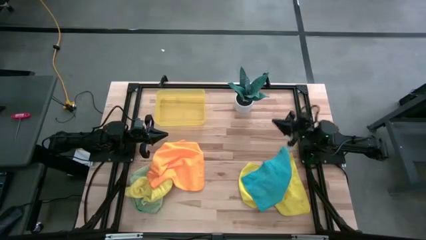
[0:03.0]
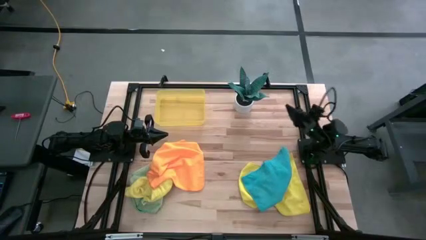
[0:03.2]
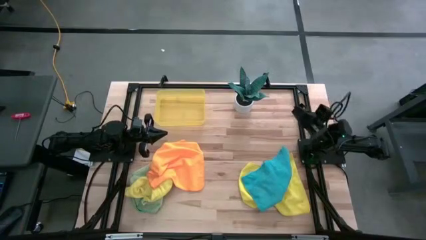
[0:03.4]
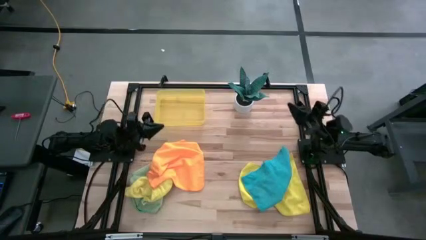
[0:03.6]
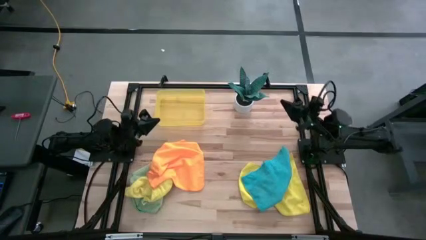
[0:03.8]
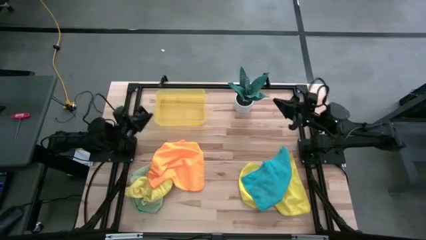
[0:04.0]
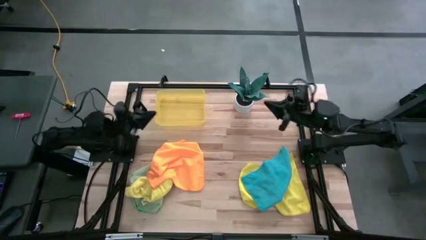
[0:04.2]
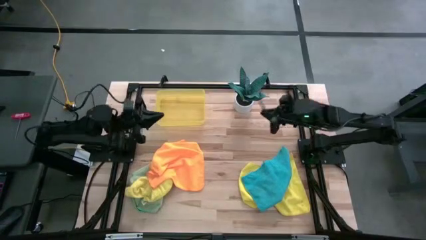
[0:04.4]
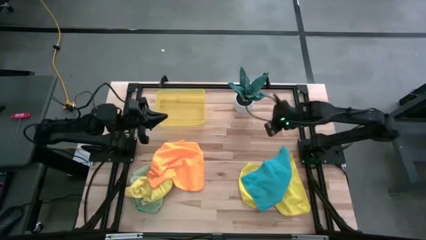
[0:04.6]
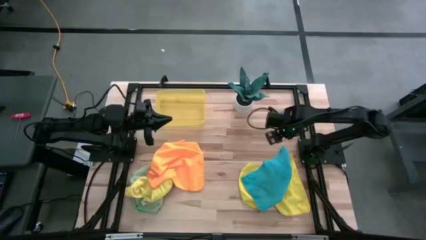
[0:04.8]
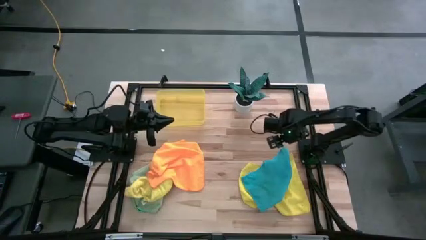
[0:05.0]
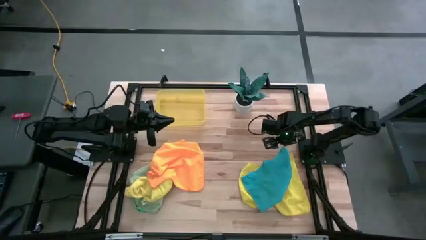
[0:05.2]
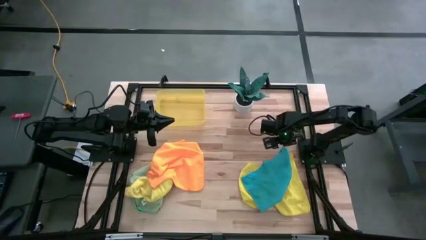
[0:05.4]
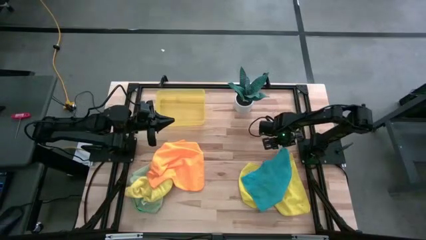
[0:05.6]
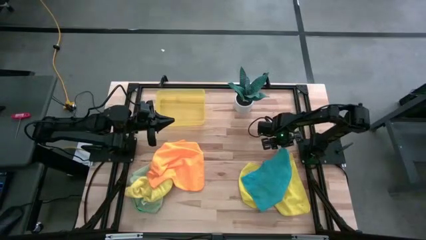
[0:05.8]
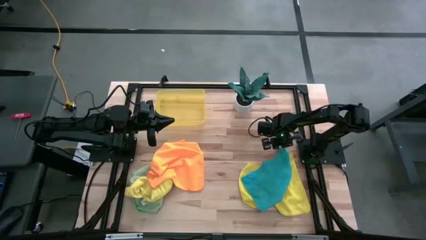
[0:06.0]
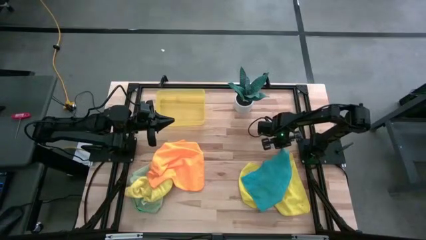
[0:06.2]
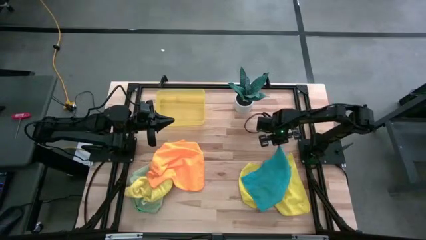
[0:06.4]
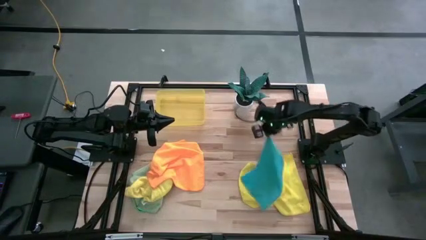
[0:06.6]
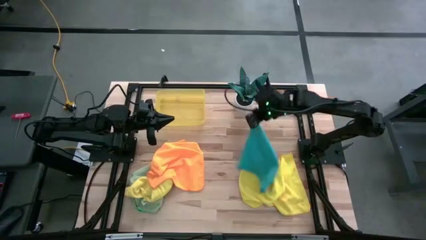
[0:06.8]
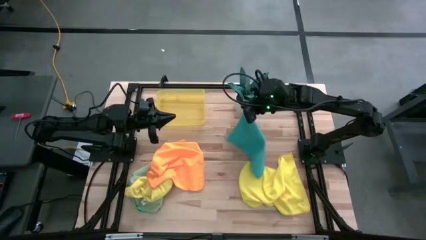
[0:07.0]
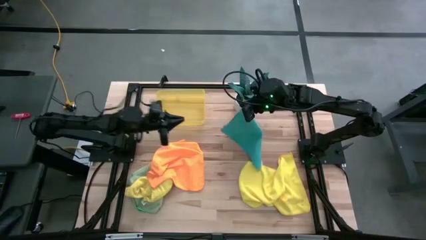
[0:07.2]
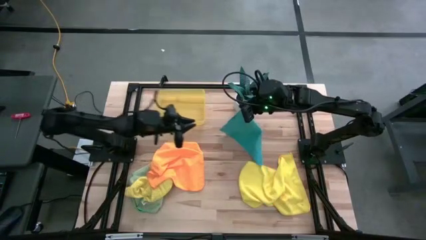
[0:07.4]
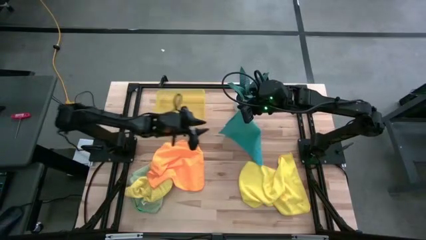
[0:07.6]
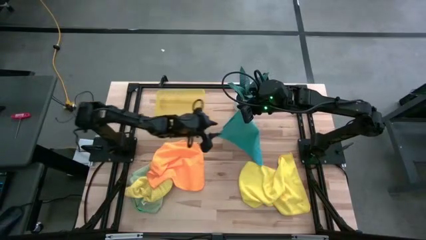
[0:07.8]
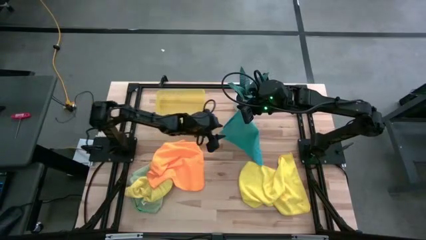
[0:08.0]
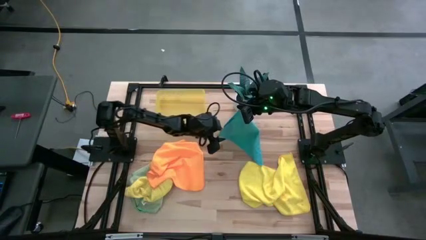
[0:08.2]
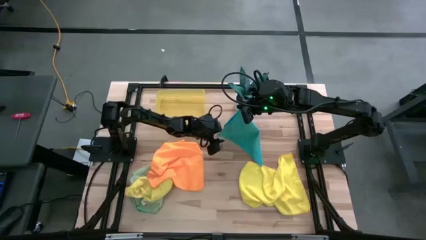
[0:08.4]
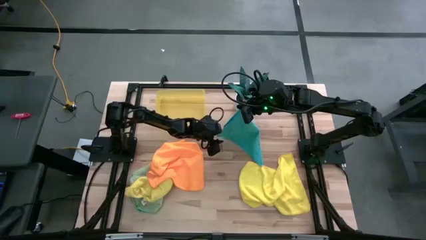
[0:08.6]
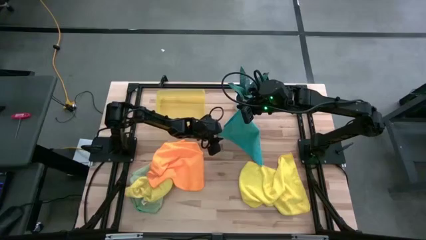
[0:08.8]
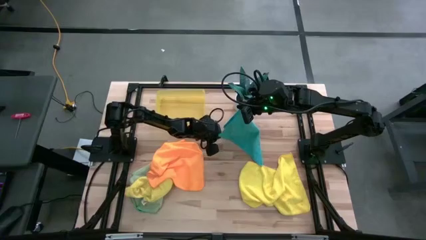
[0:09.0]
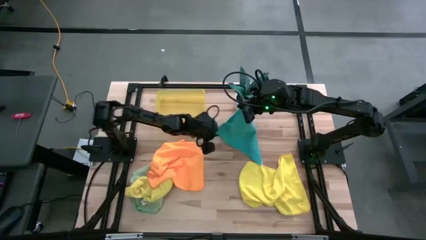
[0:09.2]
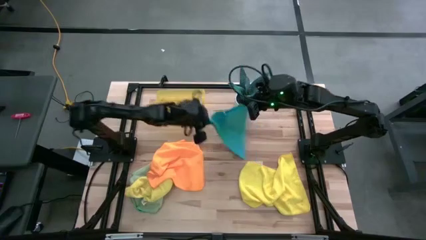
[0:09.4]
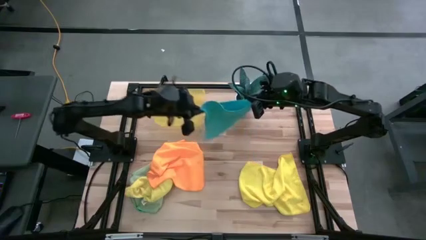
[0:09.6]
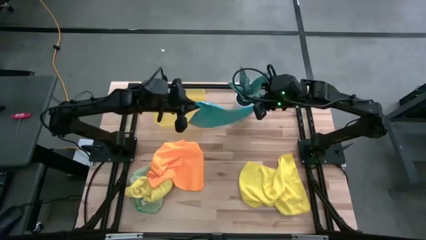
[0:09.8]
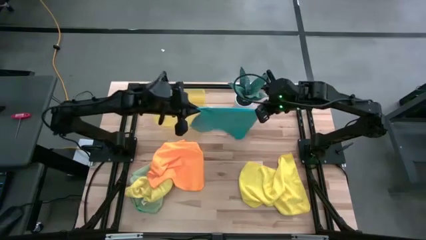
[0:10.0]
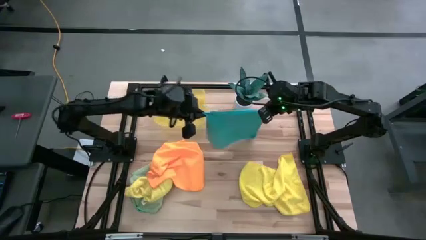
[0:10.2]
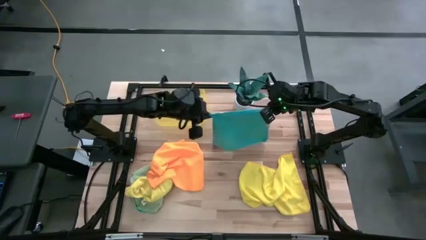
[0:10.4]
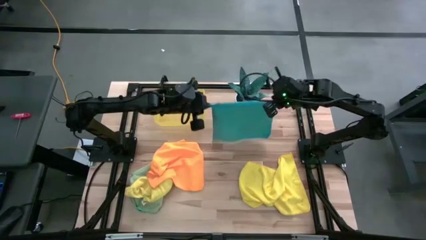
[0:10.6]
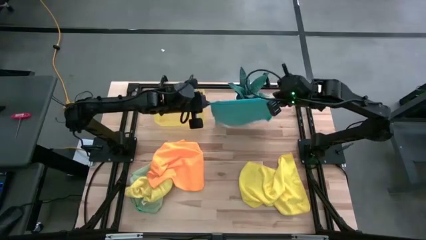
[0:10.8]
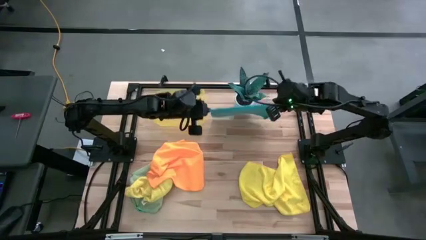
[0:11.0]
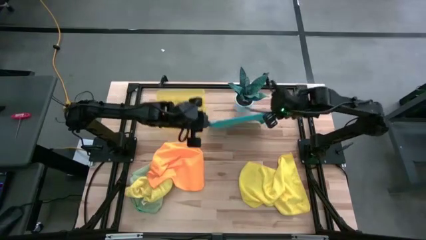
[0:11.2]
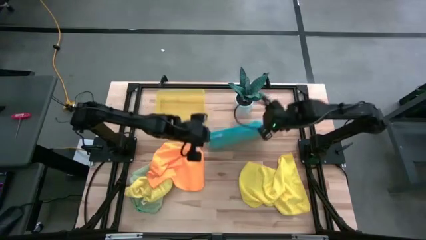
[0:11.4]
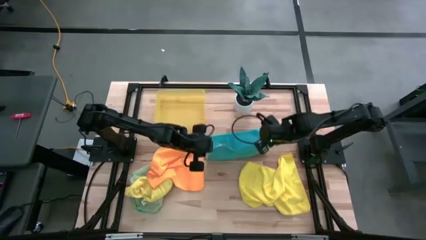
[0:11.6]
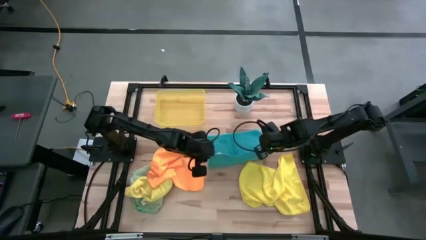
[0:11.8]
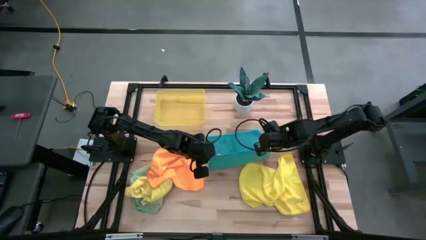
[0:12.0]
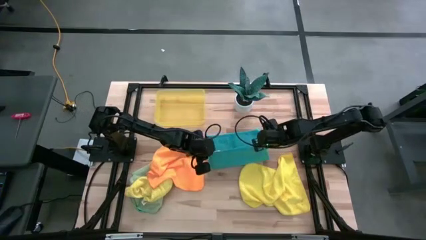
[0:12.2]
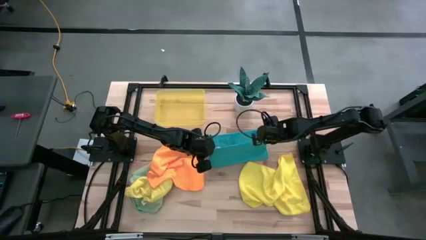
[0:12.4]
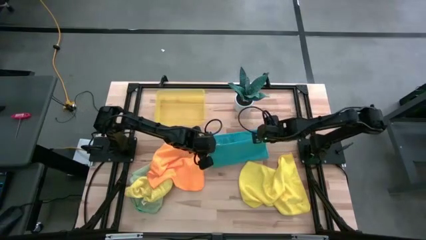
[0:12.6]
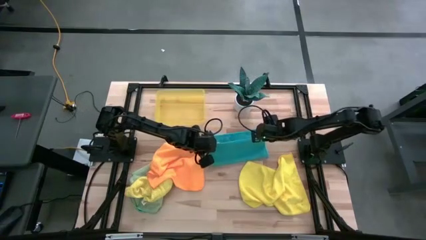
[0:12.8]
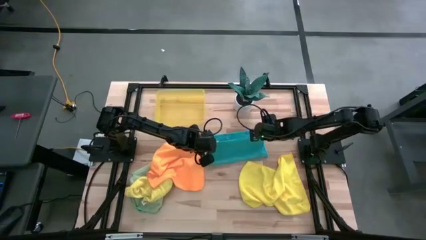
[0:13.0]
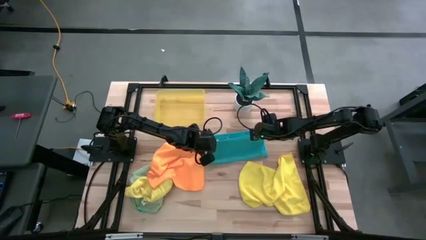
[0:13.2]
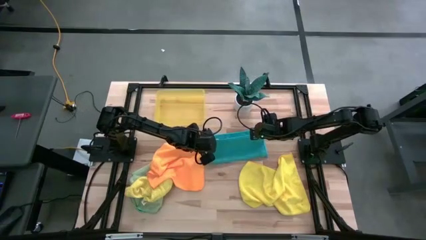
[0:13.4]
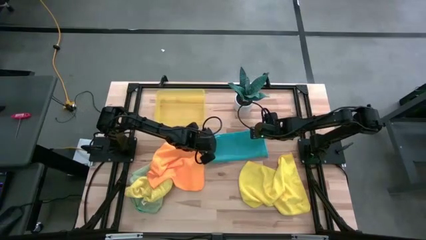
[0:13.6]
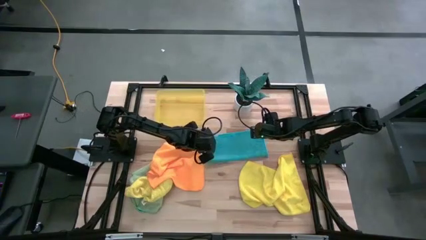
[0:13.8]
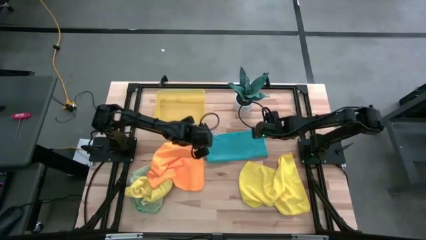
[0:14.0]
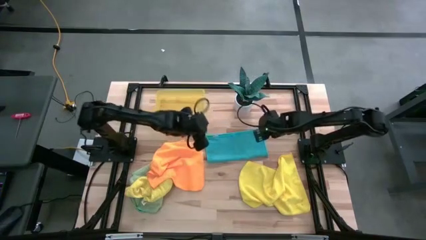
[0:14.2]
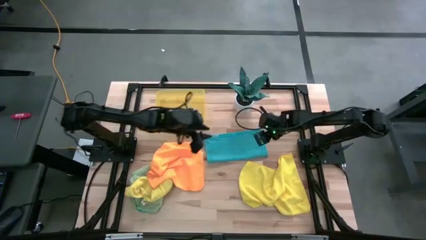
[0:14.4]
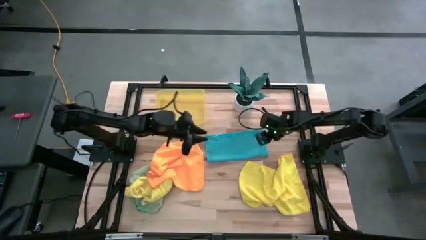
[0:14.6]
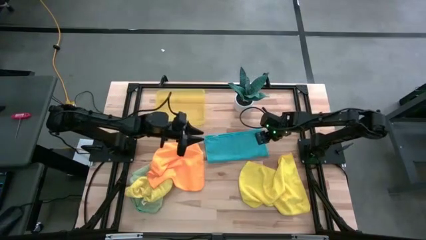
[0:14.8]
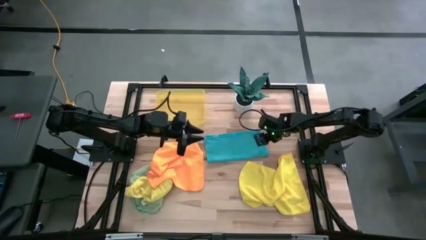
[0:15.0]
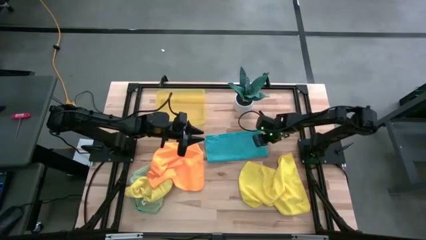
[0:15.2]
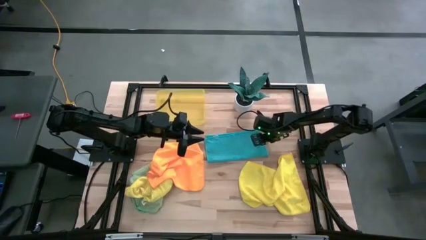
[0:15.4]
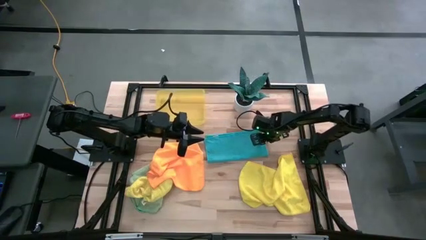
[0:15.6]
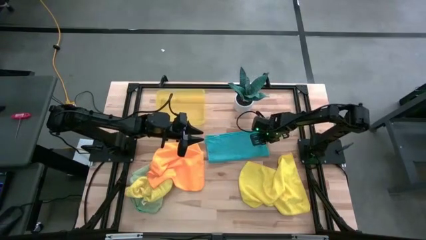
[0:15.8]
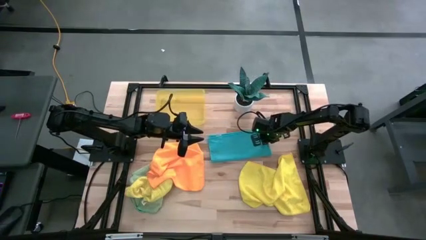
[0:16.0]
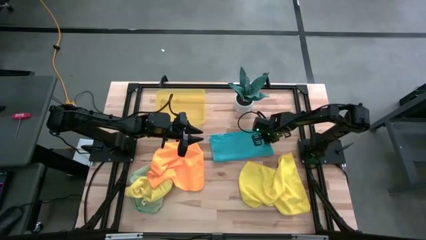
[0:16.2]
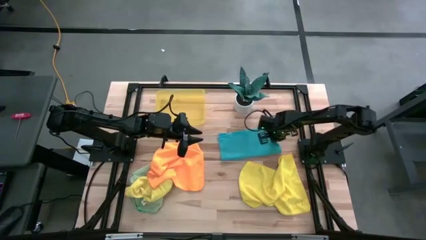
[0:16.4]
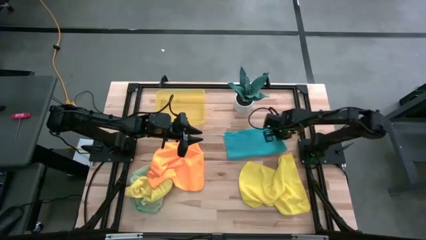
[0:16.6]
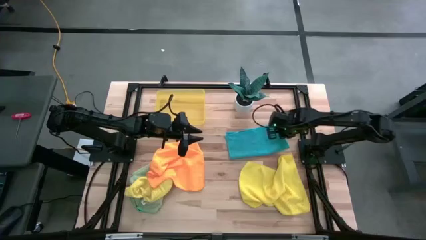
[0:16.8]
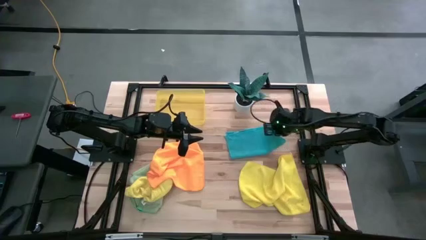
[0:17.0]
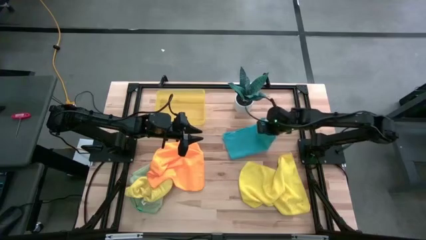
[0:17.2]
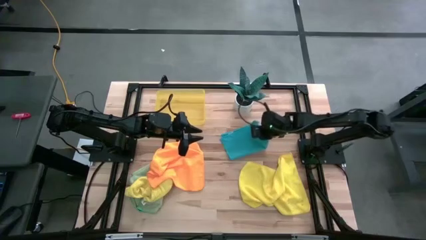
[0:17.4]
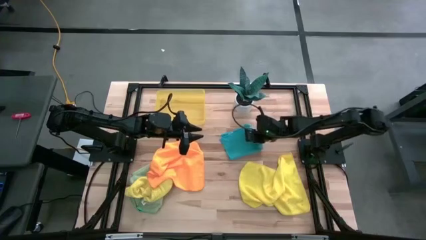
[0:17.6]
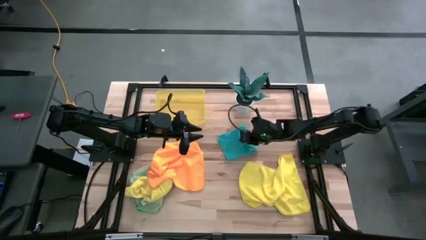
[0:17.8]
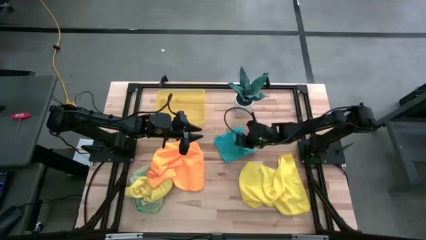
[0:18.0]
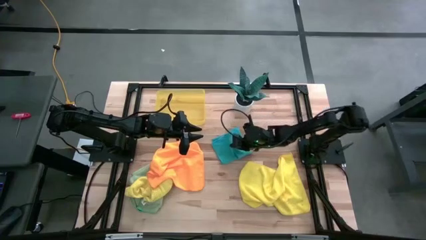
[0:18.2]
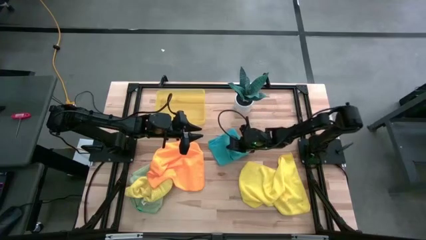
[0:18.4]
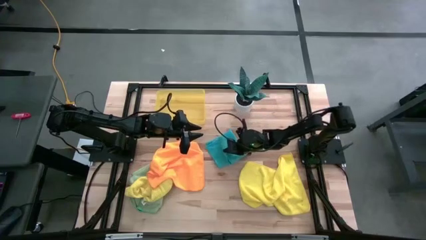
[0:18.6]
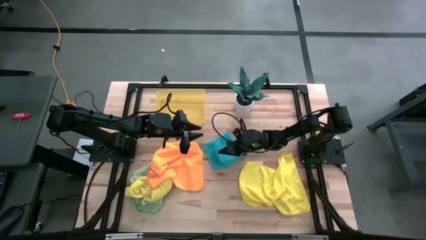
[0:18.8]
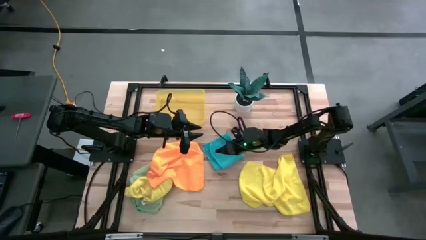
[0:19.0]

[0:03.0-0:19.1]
Task: Fold microfiber towels
Fold the blue microfiber cloth
